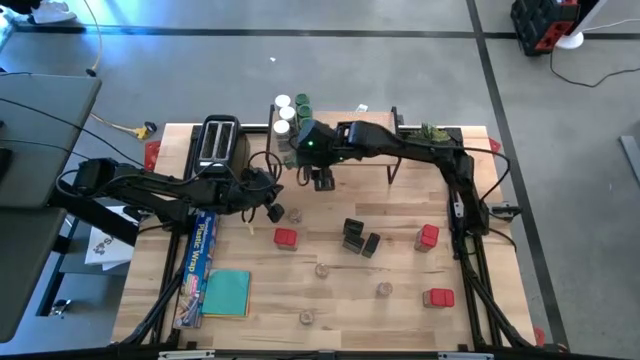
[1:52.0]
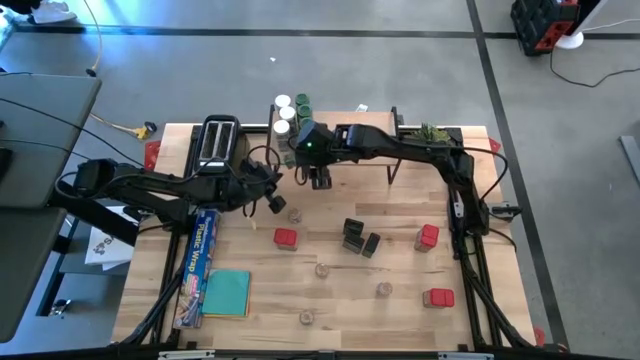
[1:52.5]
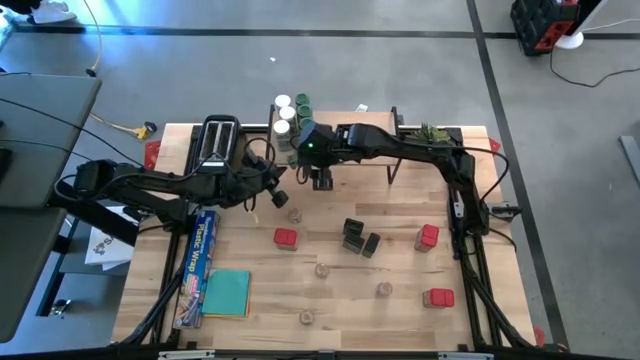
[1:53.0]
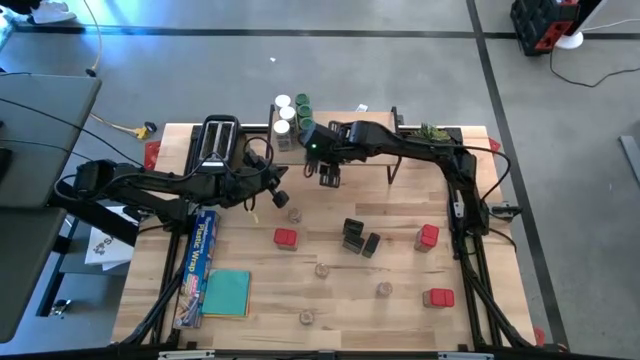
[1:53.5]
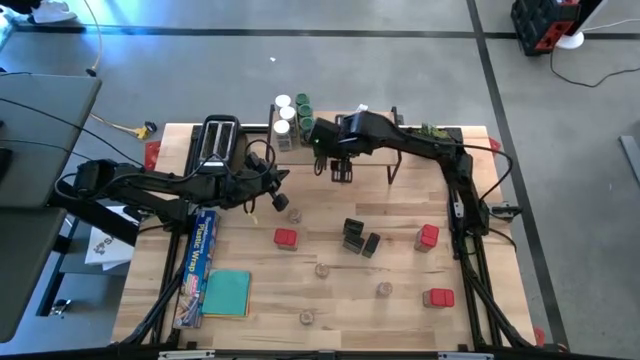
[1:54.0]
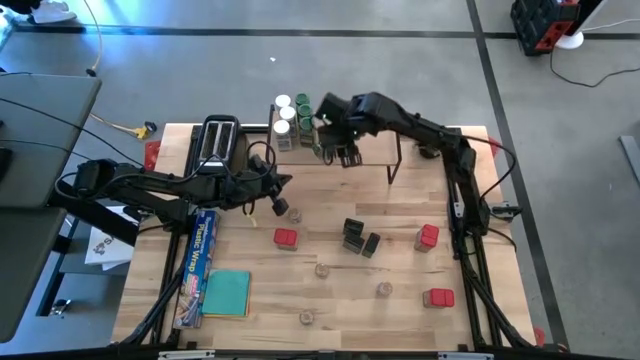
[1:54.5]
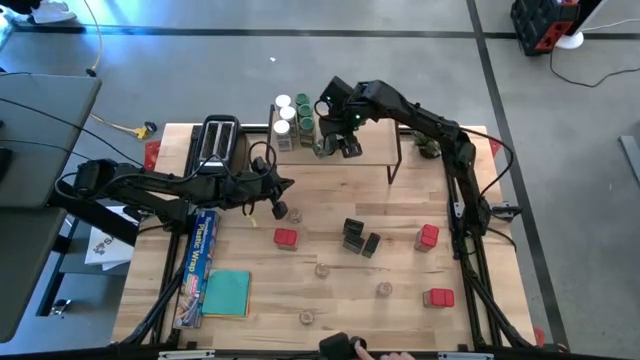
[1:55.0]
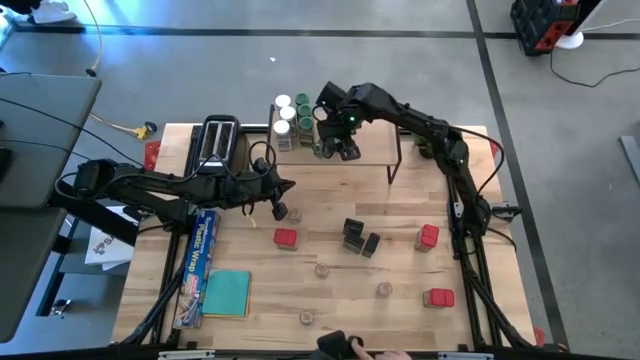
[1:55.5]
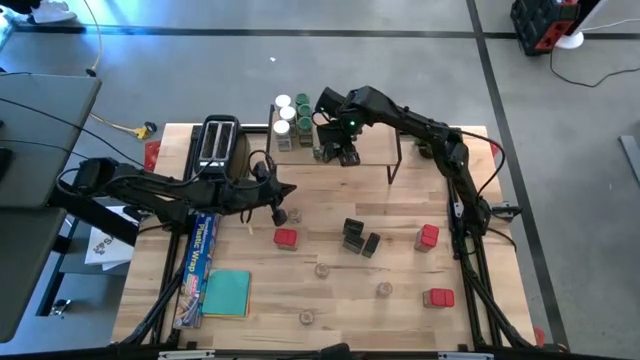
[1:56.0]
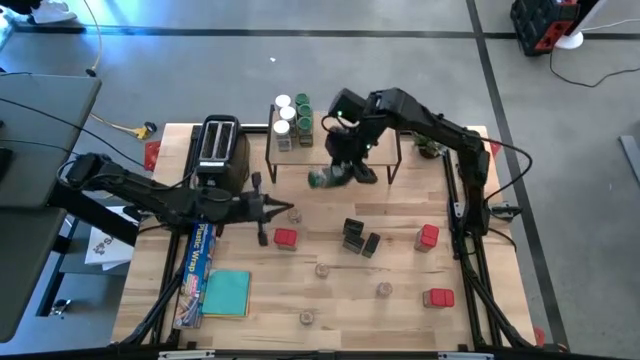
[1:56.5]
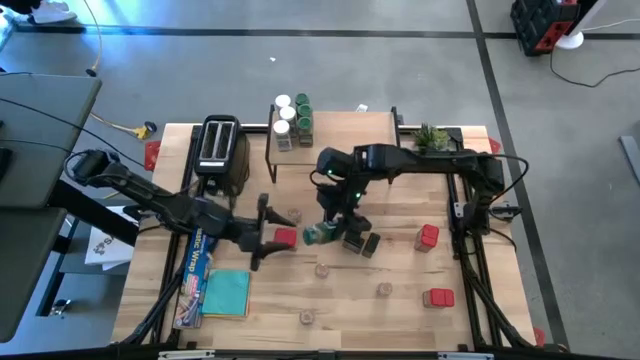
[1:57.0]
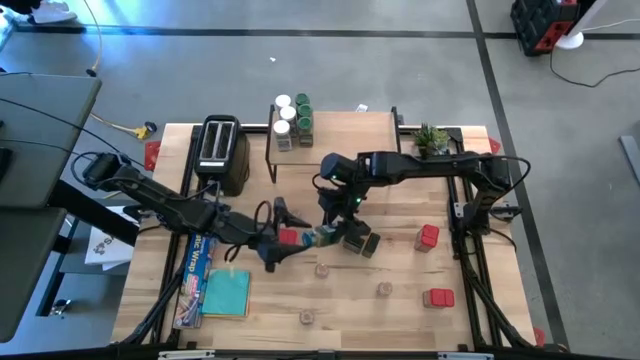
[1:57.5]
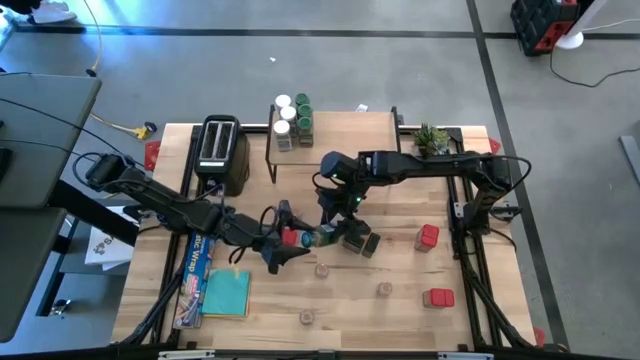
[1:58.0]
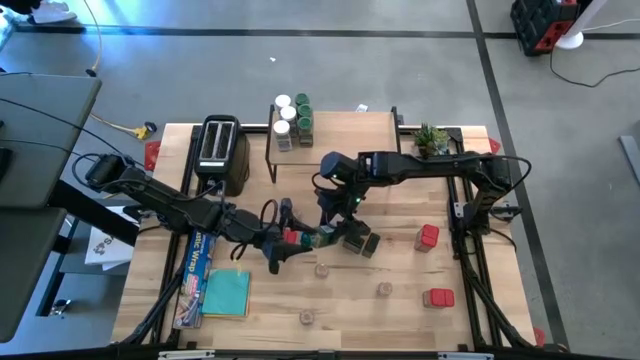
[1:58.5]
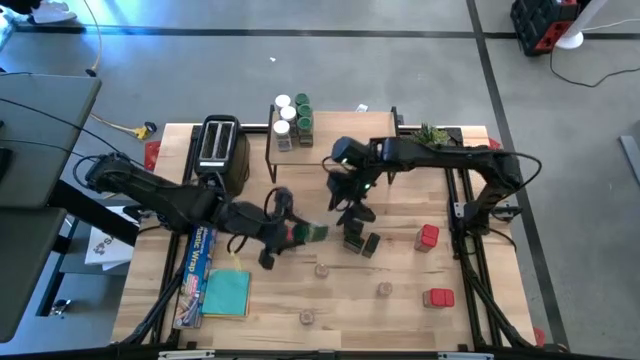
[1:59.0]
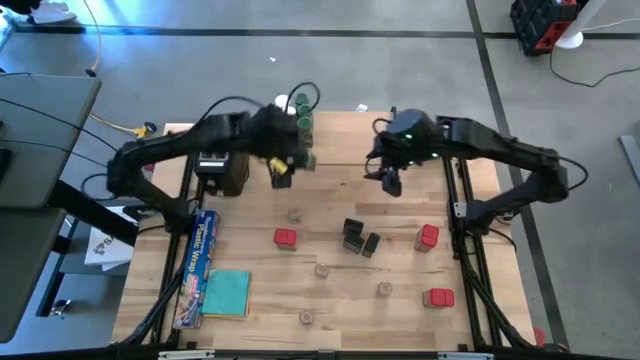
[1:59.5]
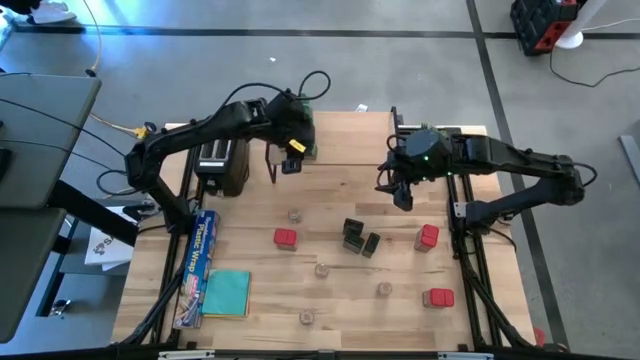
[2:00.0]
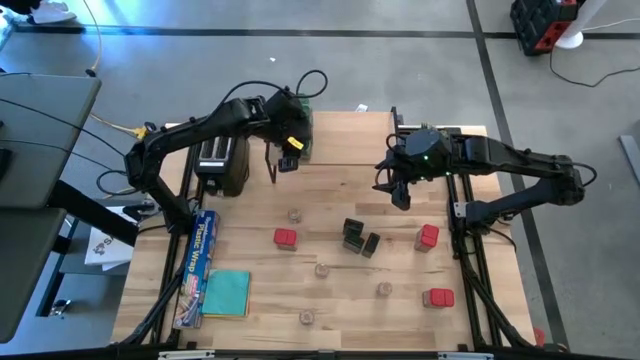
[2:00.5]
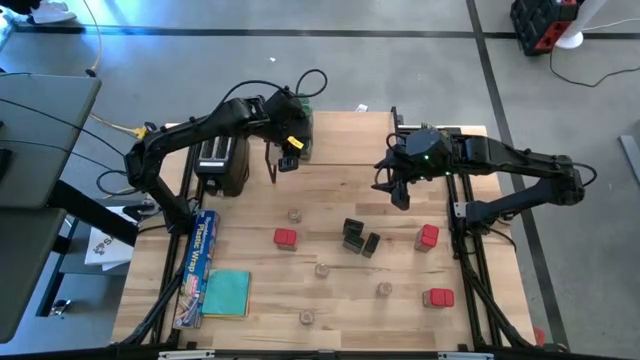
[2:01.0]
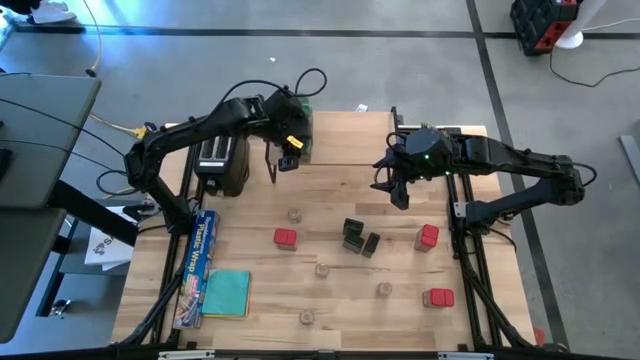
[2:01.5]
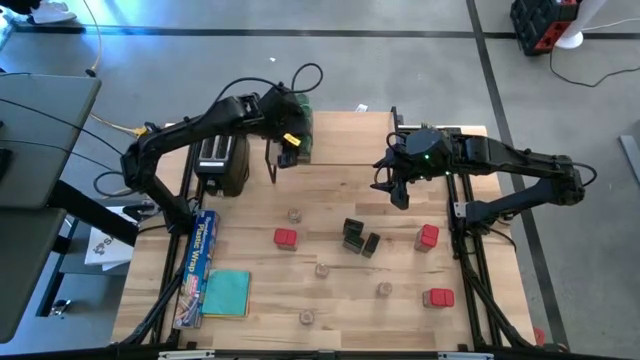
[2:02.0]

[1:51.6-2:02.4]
Task: Shelf spices
Put the green seasoning bottle on the shelf aligned with the other green seasoning bottle

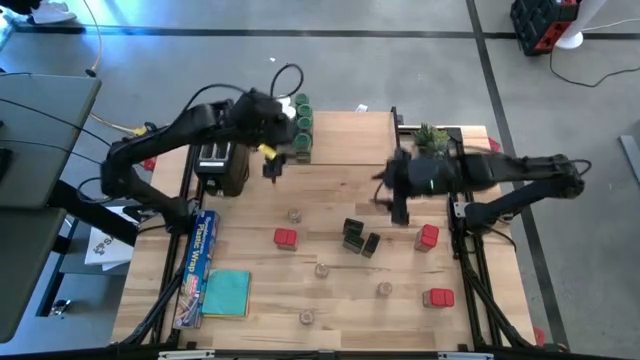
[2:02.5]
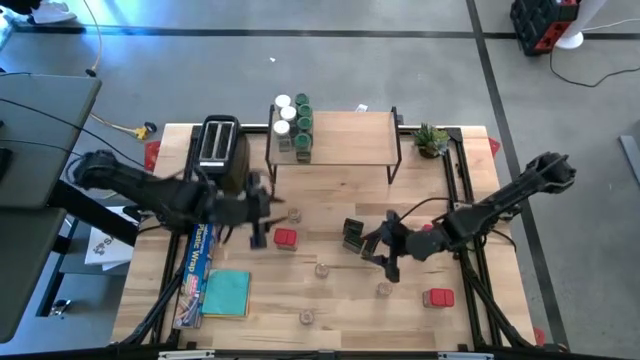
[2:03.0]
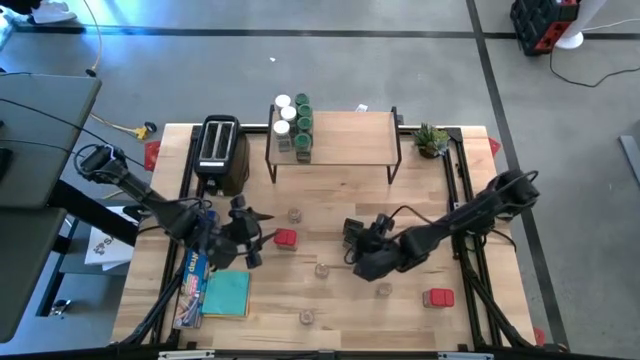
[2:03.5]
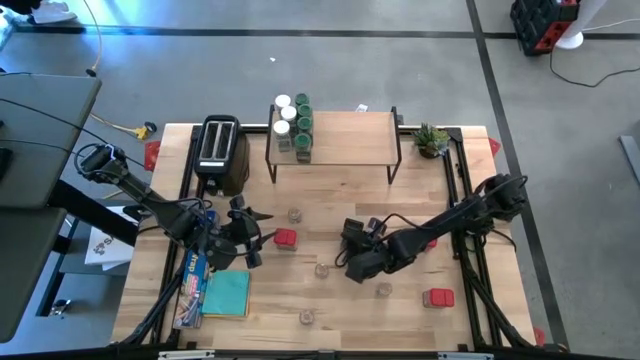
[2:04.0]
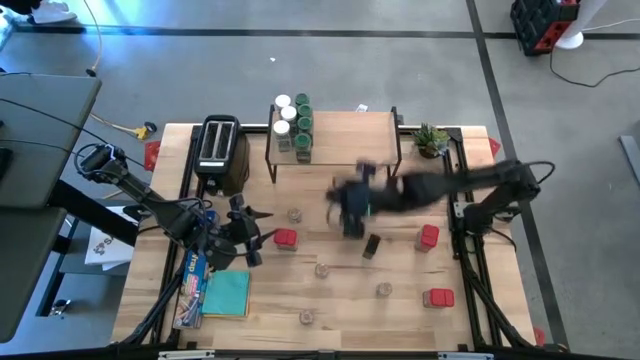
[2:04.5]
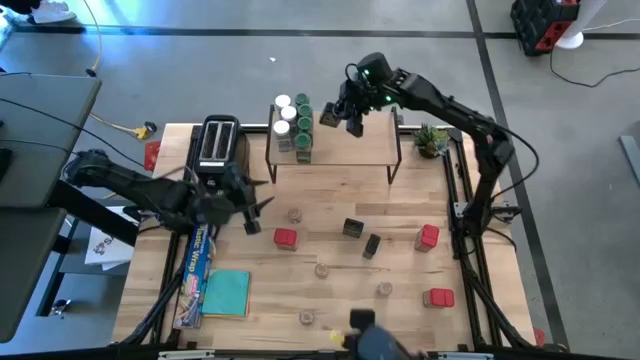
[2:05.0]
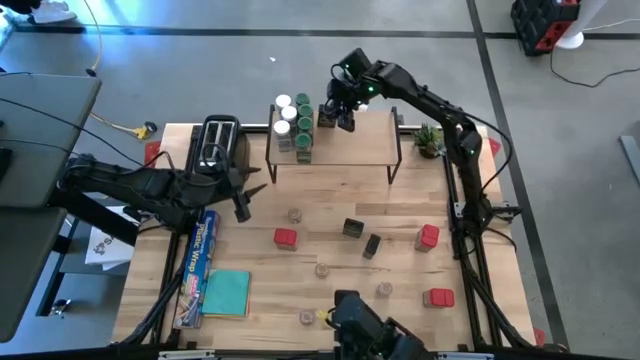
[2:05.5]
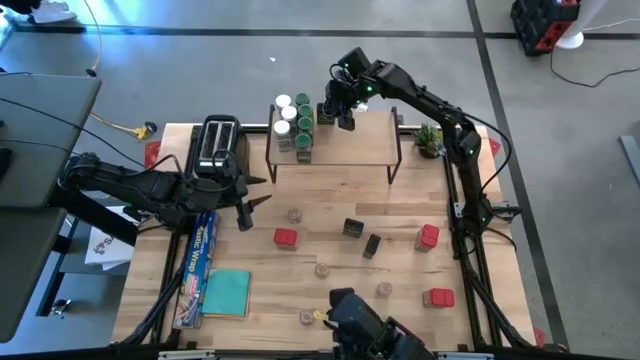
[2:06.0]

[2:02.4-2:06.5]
Put the bottom left black seasoning can on the shelf

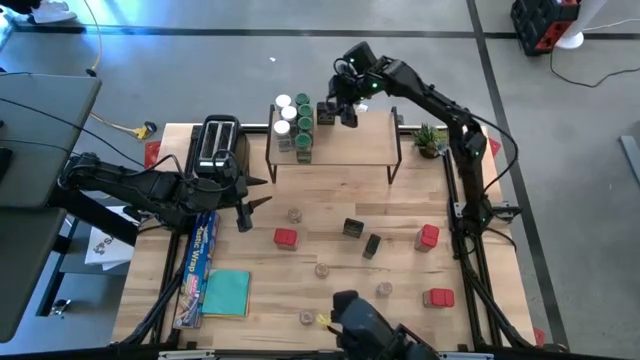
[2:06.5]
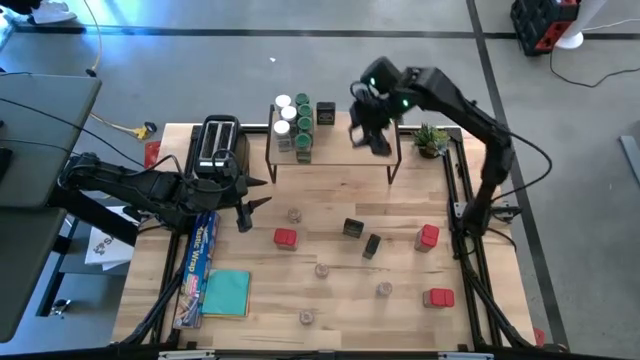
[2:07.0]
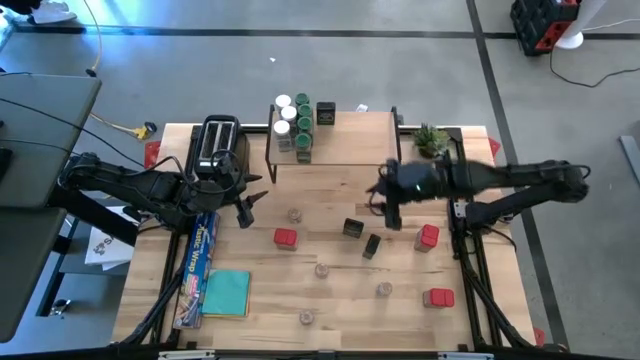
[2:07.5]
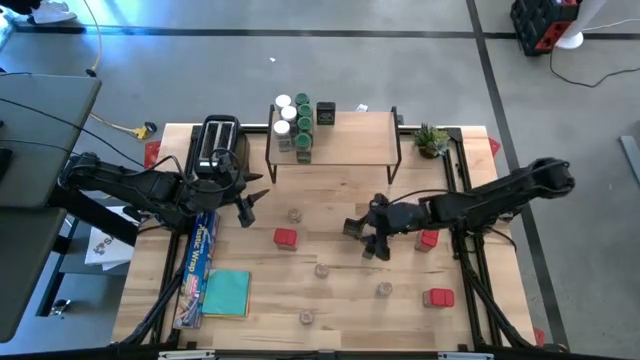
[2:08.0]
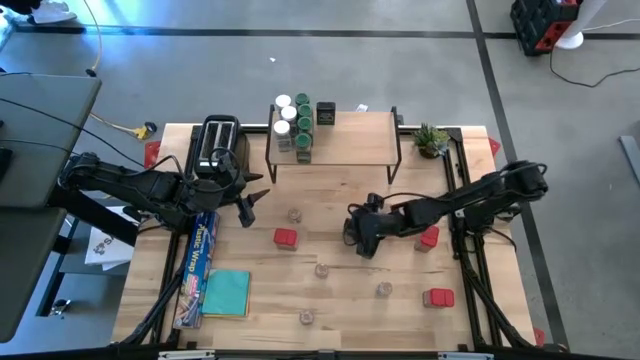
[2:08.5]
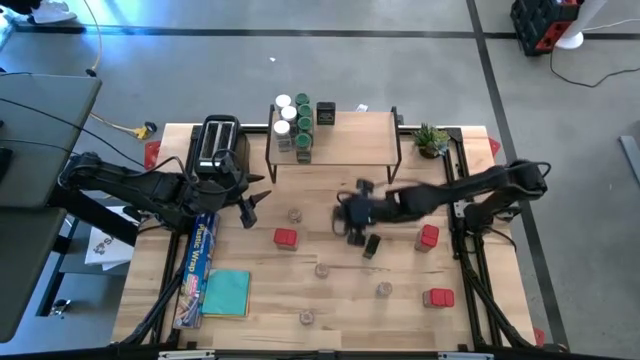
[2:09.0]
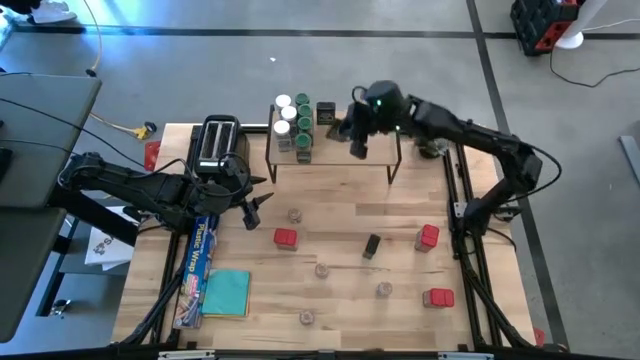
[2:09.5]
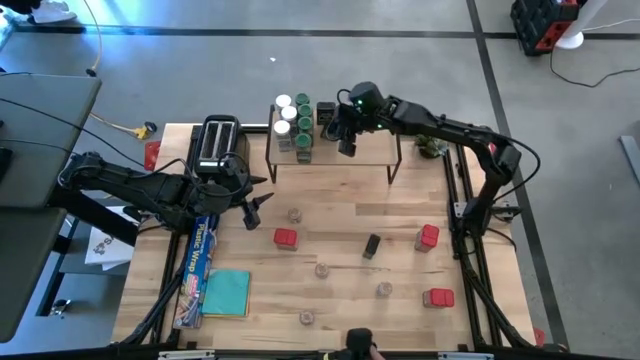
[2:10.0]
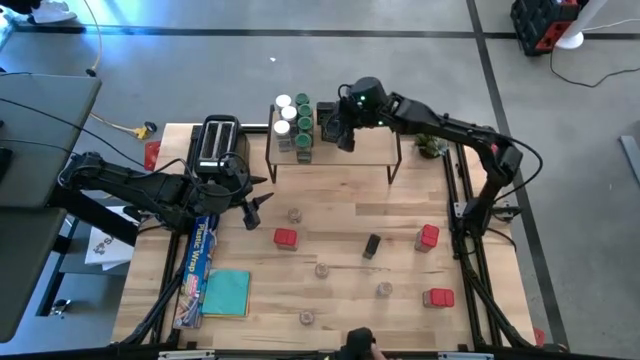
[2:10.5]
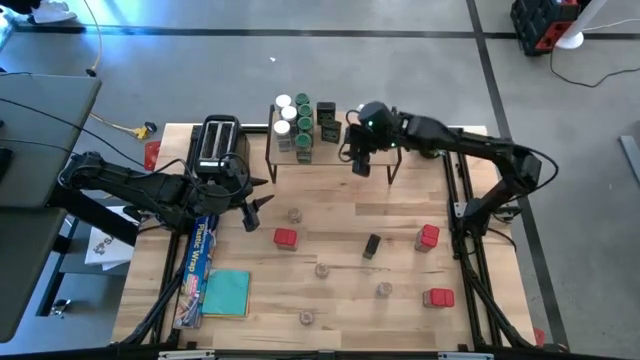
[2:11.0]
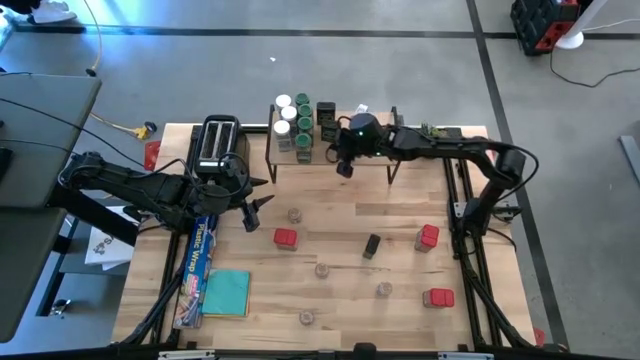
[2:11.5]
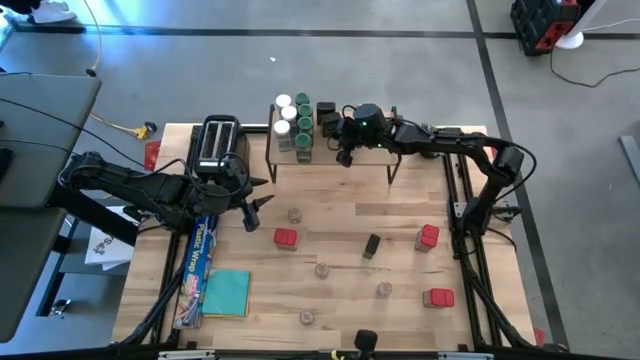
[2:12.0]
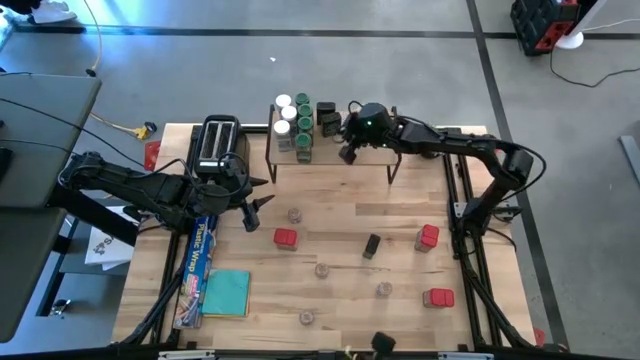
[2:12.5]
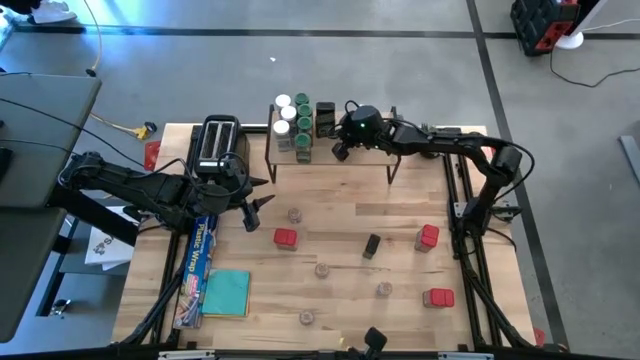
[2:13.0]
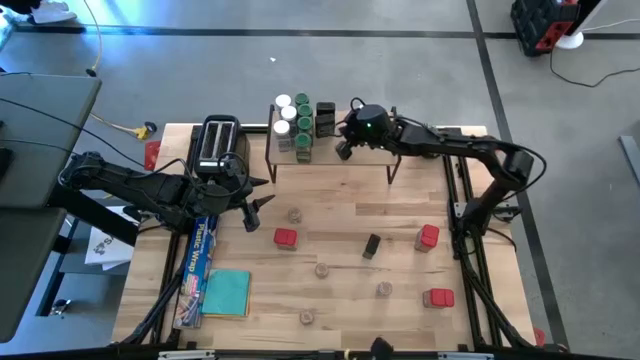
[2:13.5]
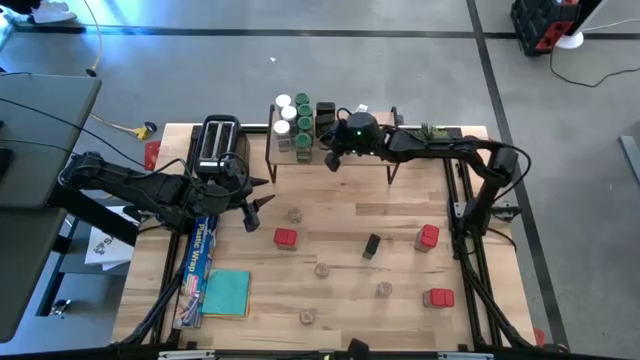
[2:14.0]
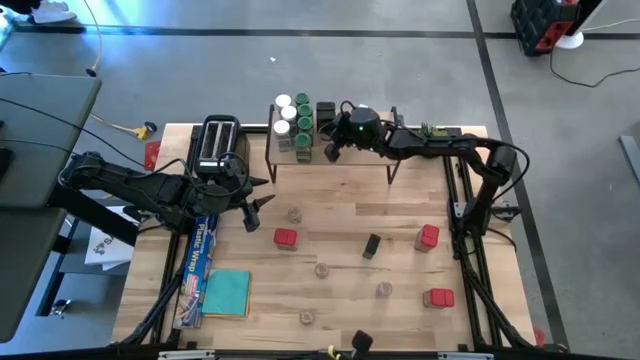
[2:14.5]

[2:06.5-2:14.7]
Put the top black seasoning can on the shelf aligned with the other black seasoning can
